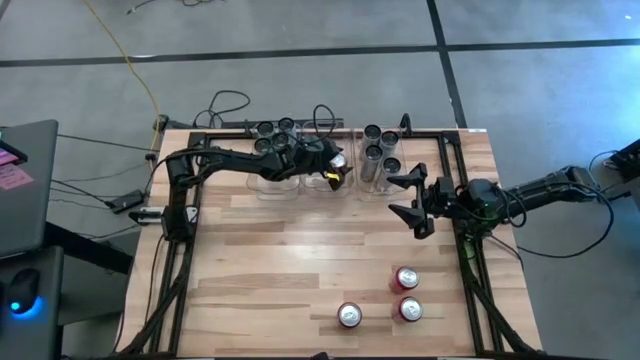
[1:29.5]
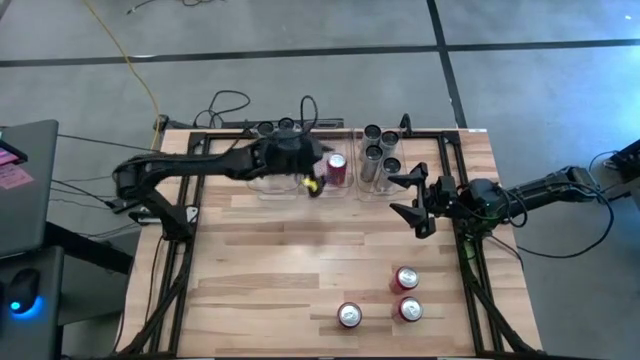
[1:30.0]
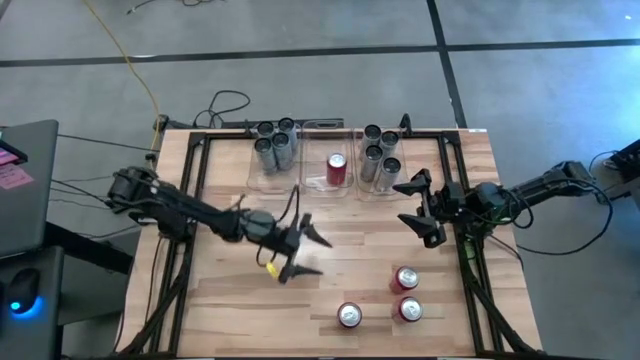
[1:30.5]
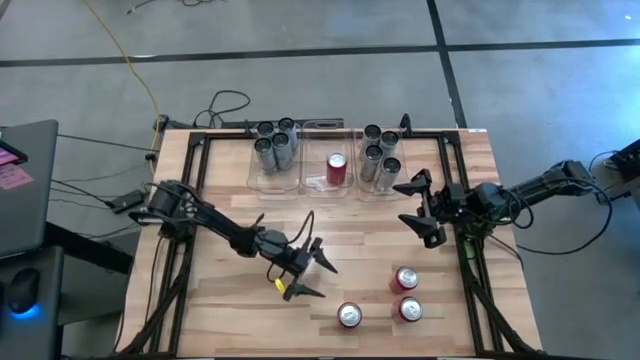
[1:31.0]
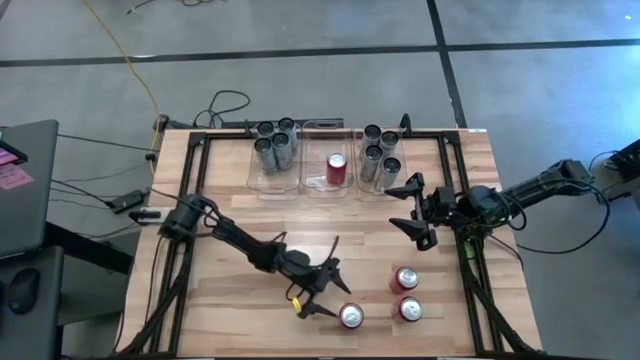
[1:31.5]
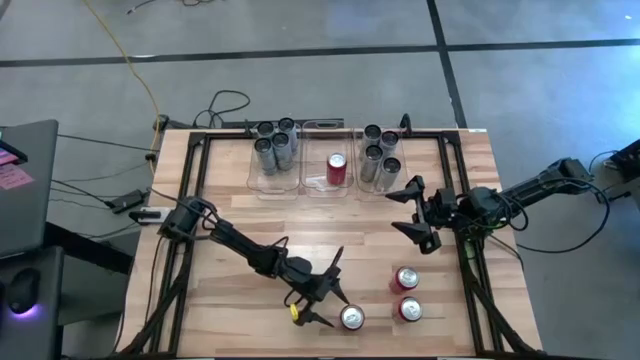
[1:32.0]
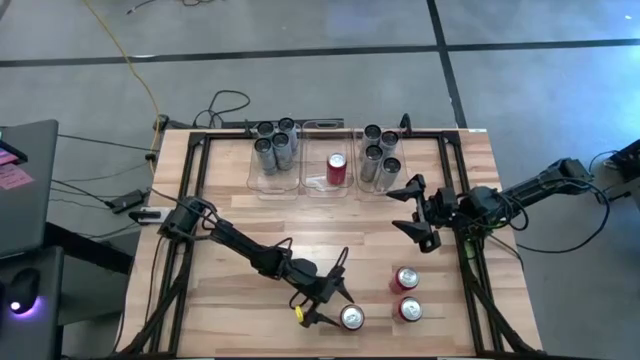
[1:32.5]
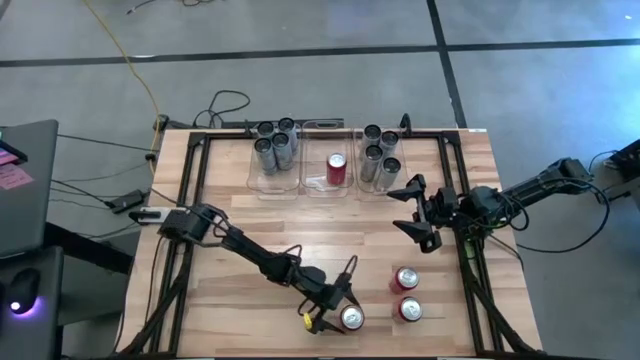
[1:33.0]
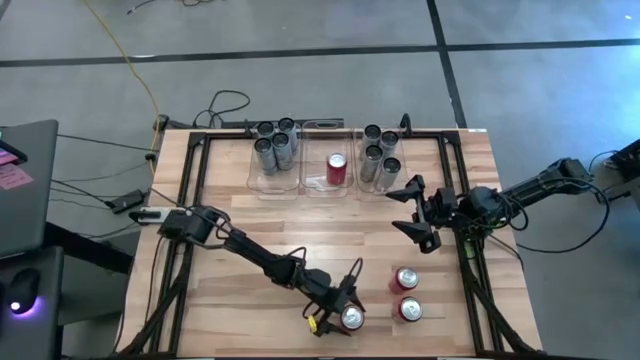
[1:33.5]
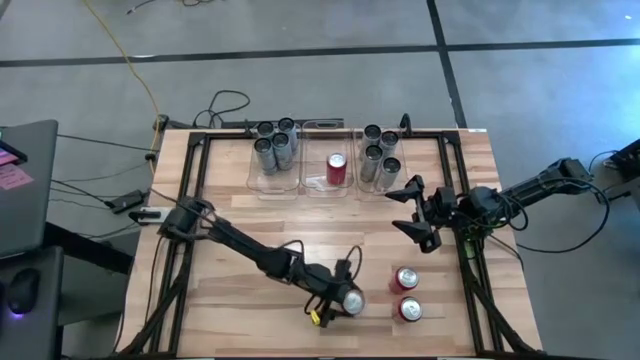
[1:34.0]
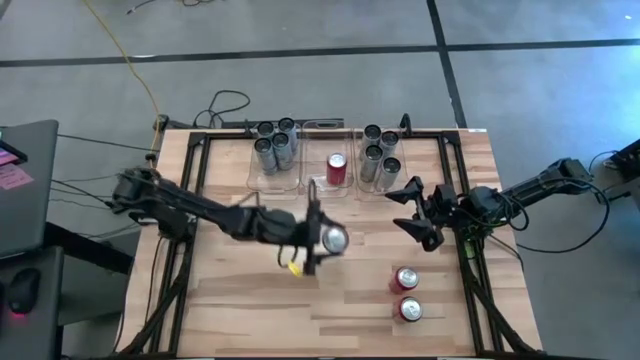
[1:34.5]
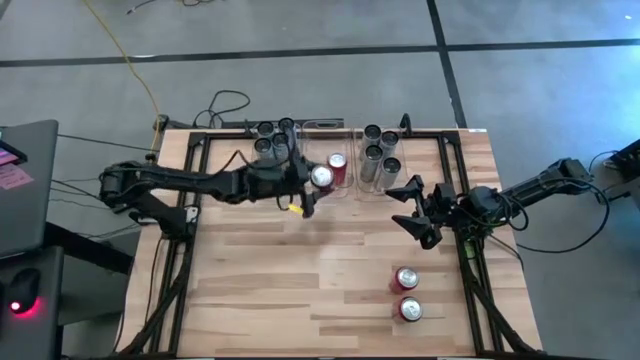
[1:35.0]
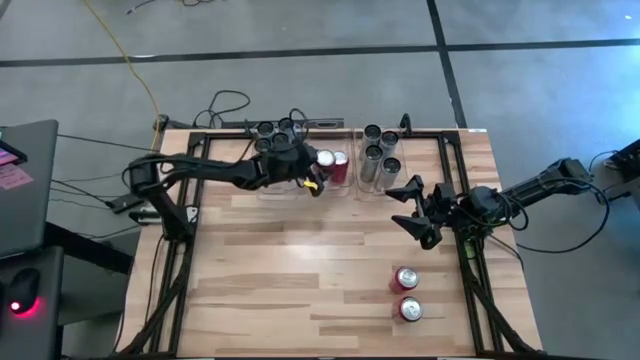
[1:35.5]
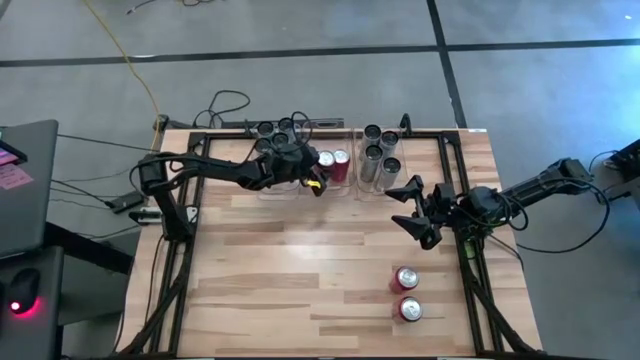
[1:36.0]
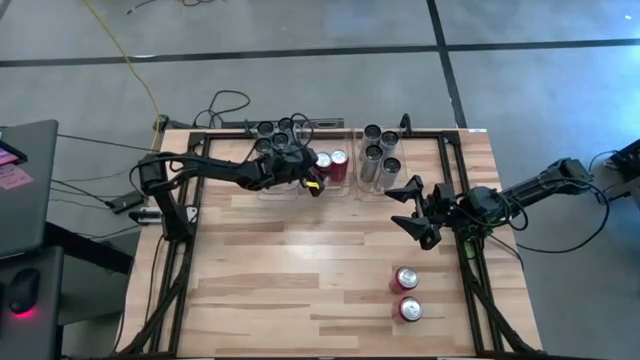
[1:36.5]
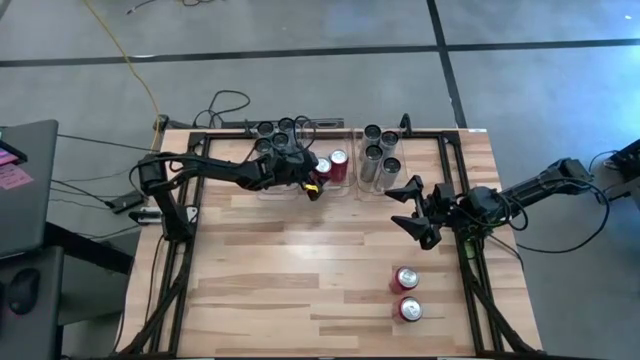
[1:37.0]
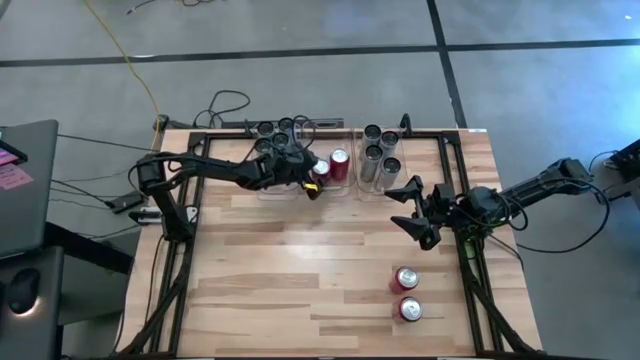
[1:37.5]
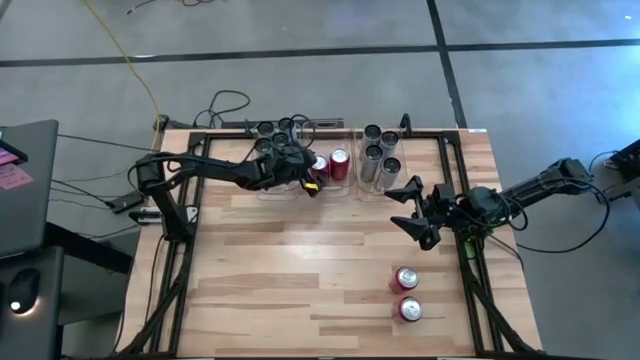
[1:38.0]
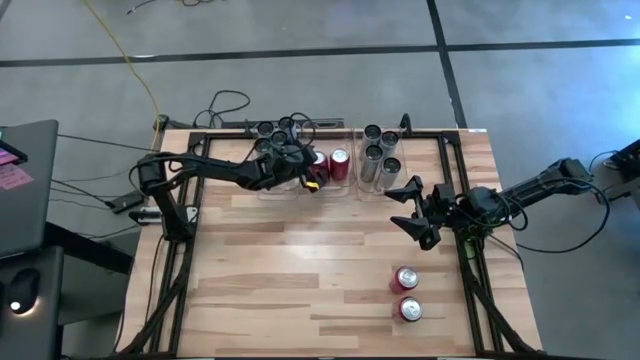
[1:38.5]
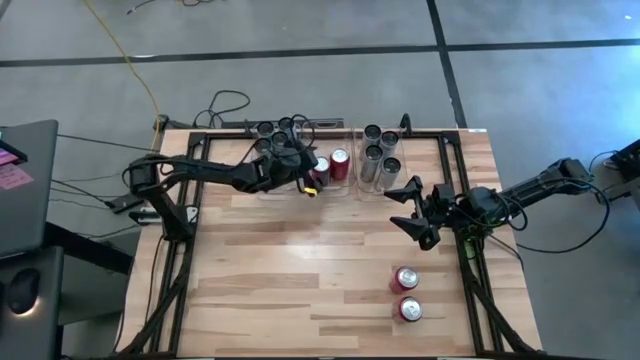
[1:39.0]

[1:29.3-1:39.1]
Task: Sort soda cans
Put the red-black soda can into the middle transparent bin

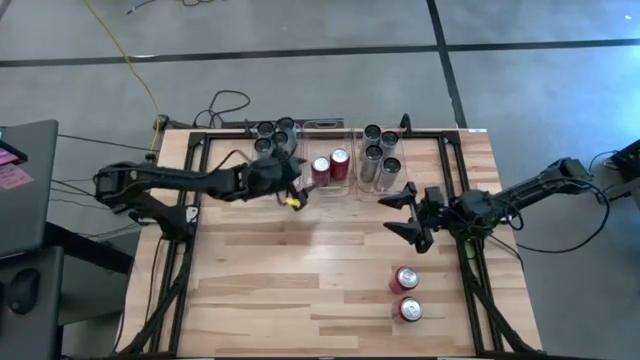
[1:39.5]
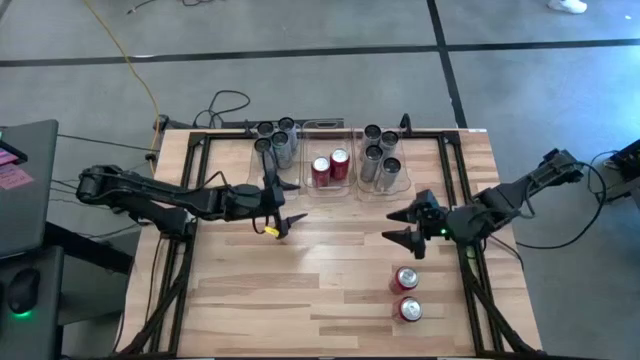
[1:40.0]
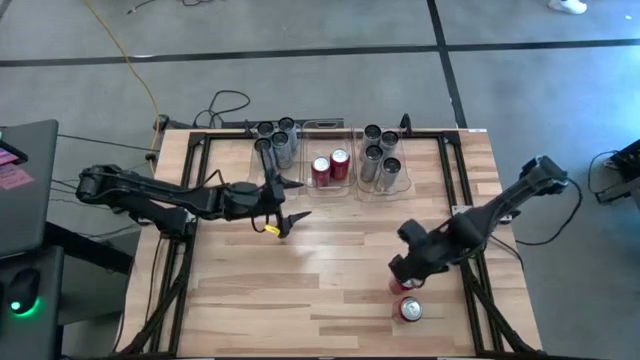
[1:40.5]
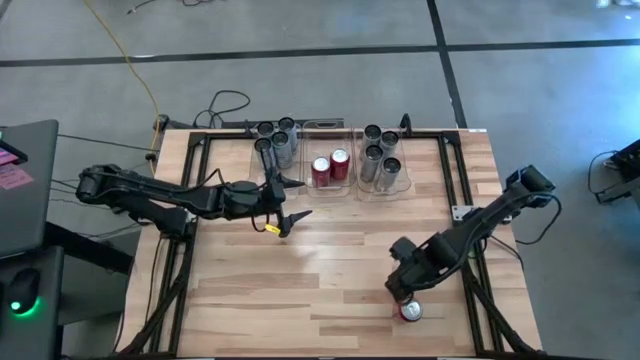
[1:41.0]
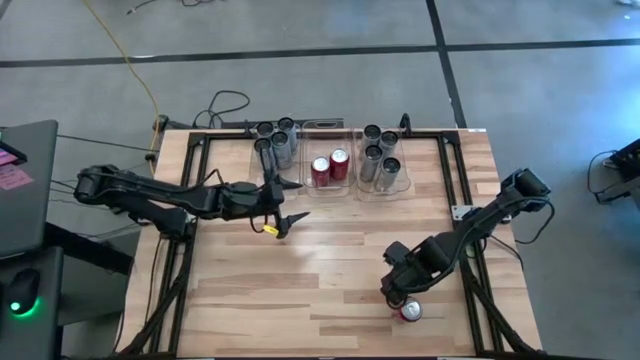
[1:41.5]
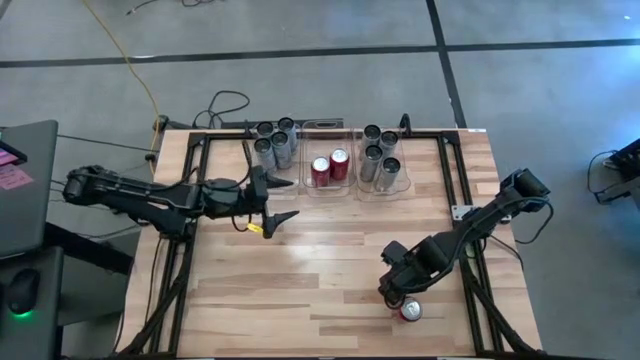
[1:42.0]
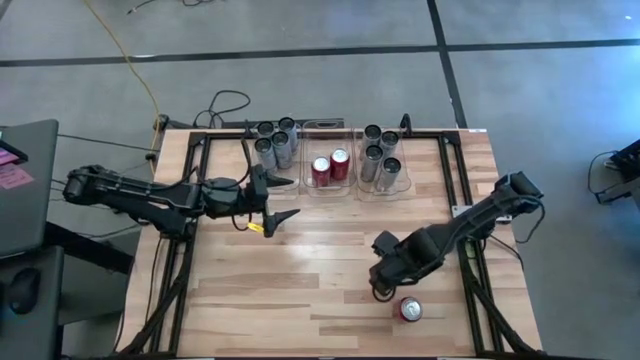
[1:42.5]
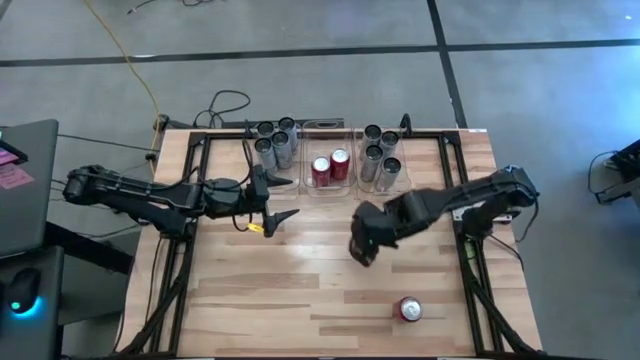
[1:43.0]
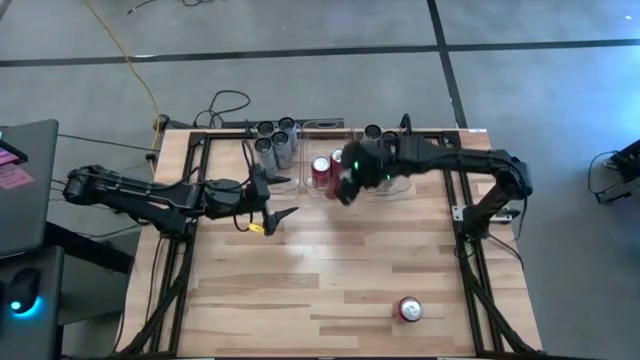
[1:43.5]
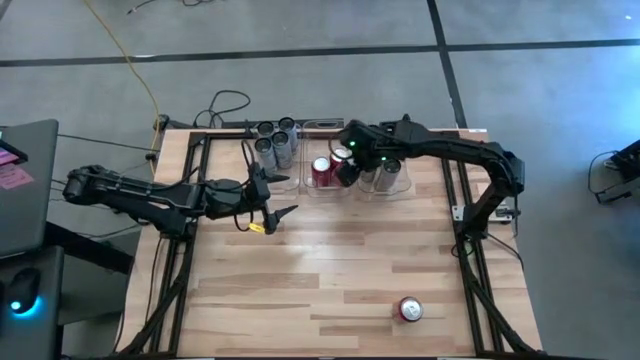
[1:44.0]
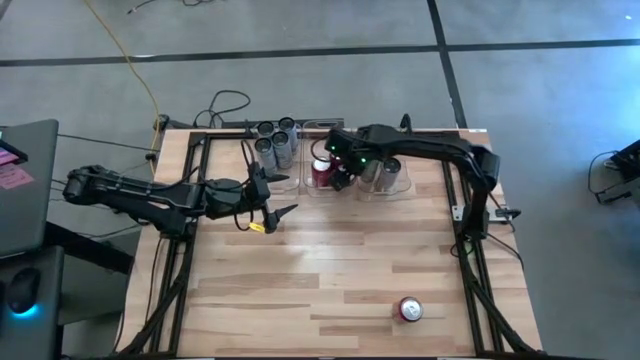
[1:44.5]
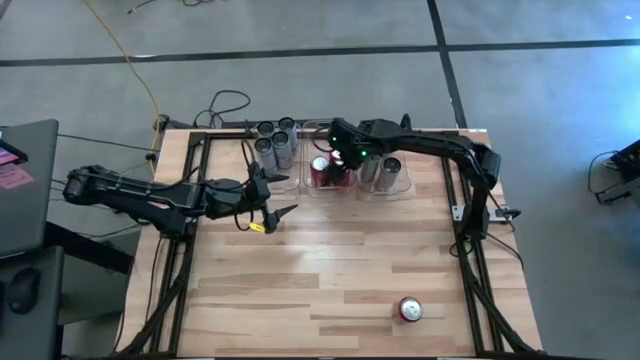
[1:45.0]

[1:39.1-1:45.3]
Put the red-black soda can into the middle transparent bin

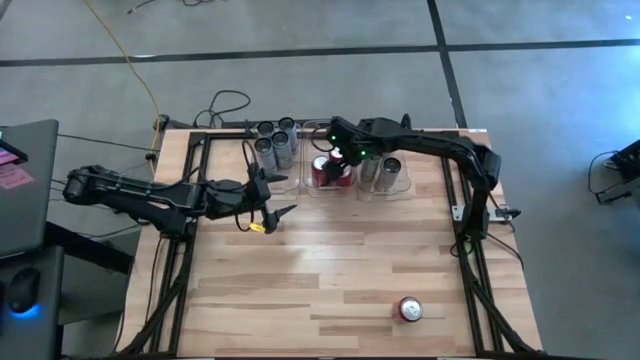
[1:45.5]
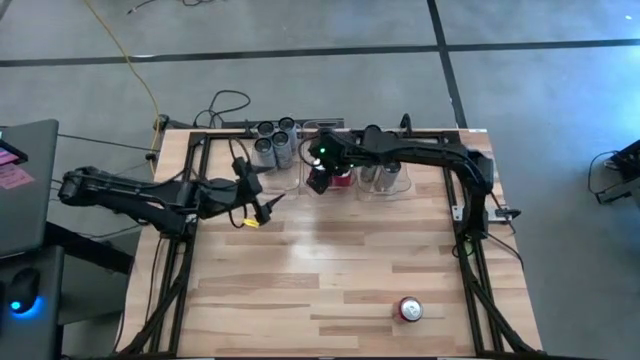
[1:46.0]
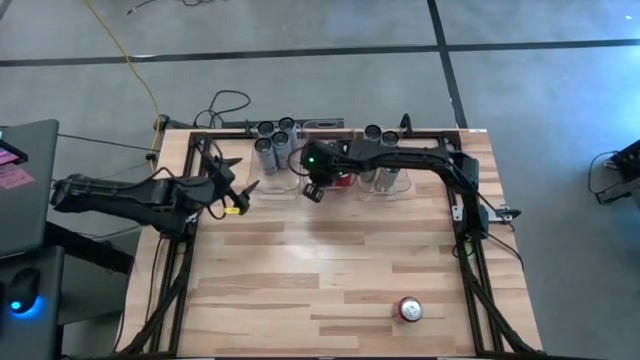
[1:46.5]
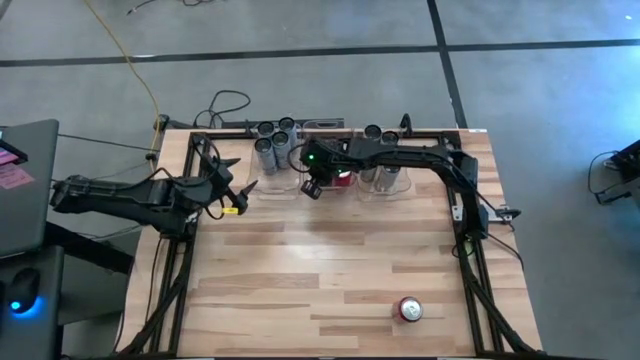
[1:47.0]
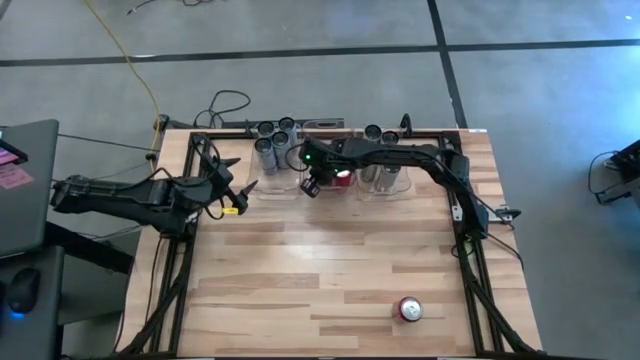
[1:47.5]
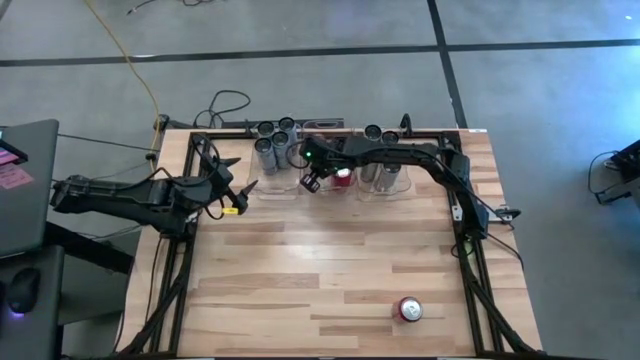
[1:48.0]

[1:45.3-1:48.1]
Adjust the red soda can in the middle transparent bin

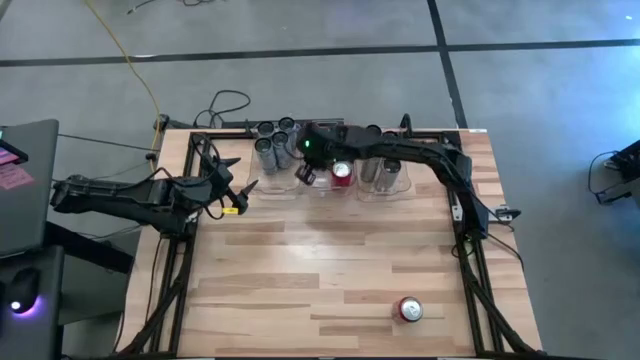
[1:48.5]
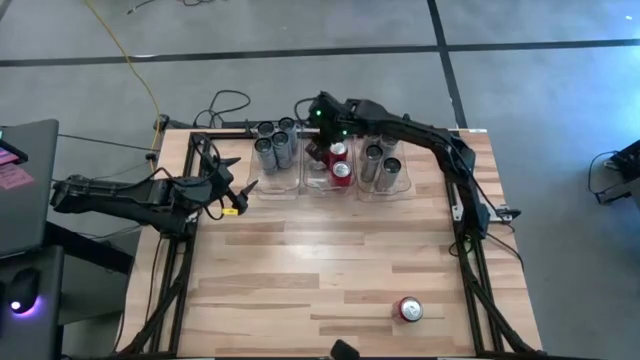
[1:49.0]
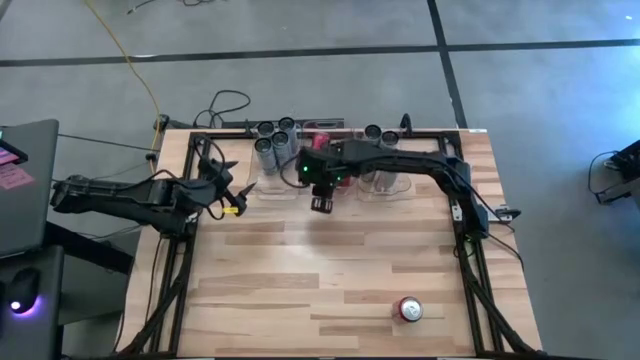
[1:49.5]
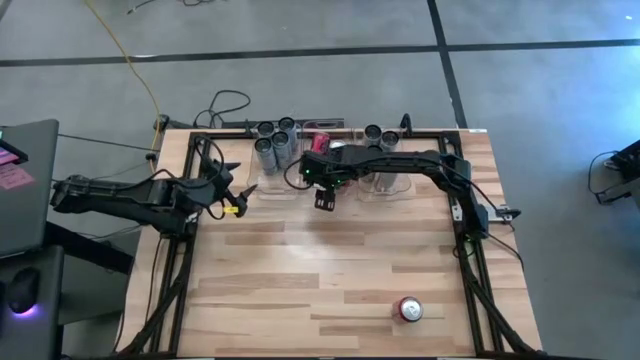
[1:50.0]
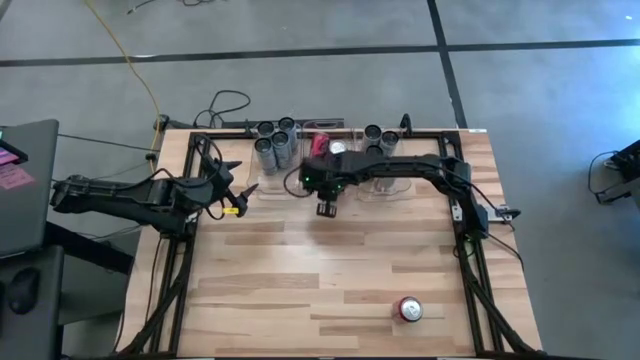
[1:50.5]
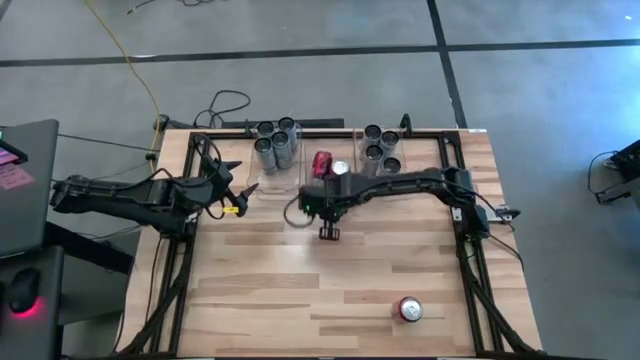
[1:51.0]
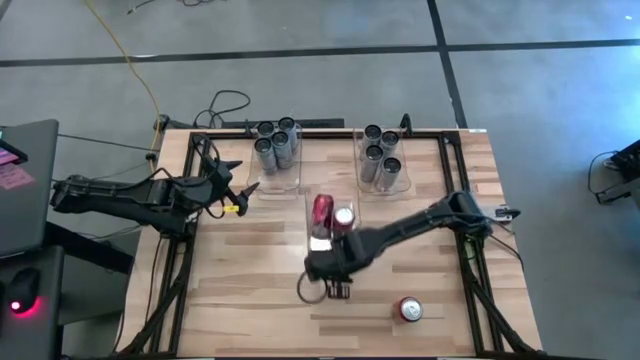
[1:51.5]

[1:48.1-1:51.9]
Move the middle transparent bin to the center of the table
